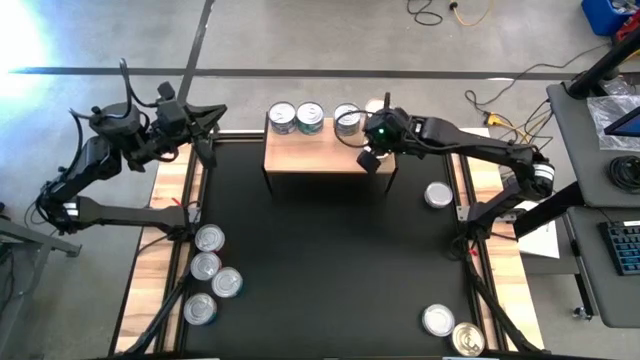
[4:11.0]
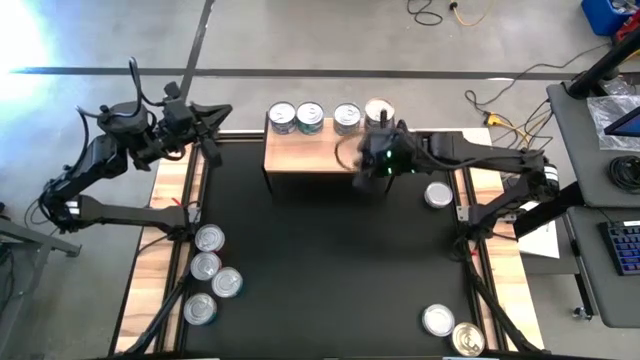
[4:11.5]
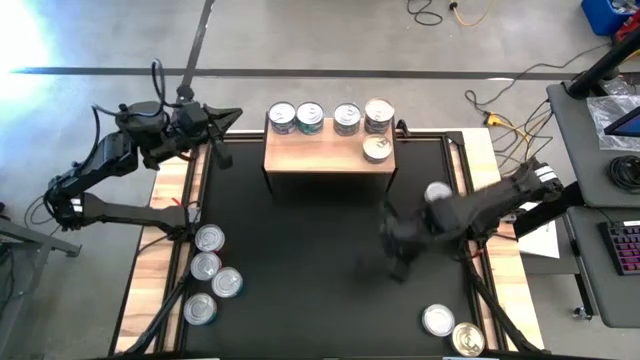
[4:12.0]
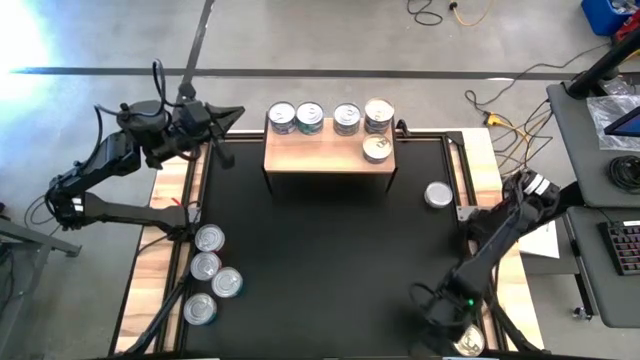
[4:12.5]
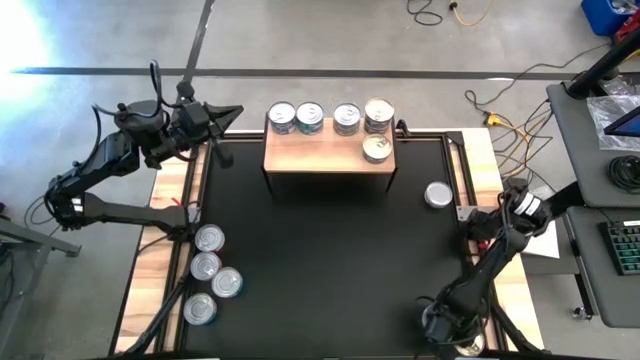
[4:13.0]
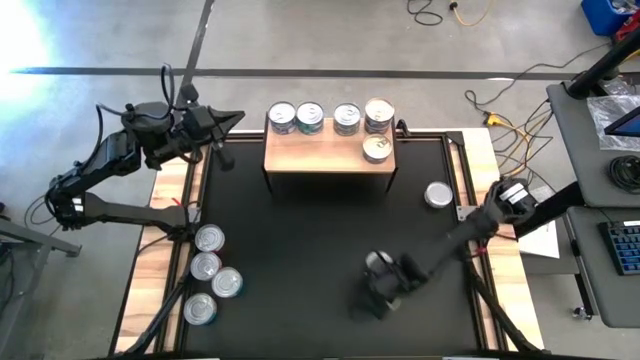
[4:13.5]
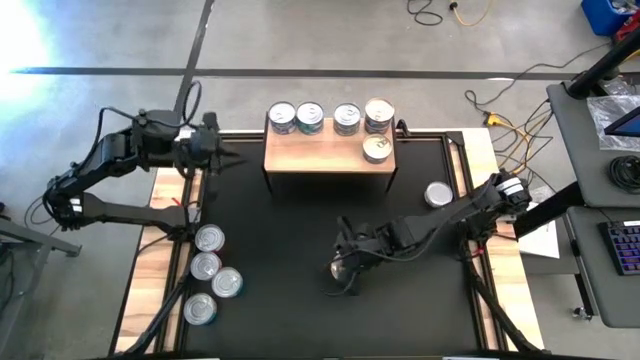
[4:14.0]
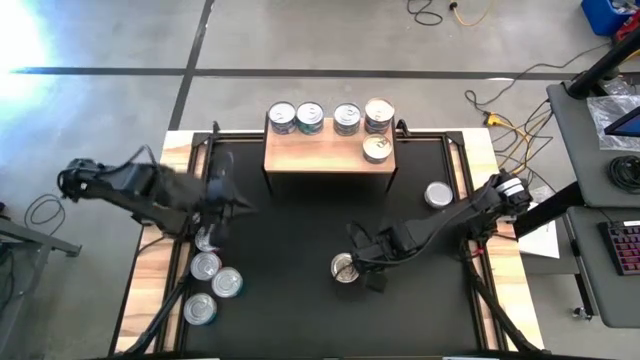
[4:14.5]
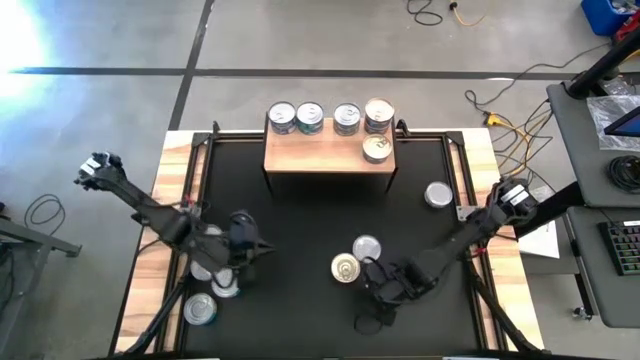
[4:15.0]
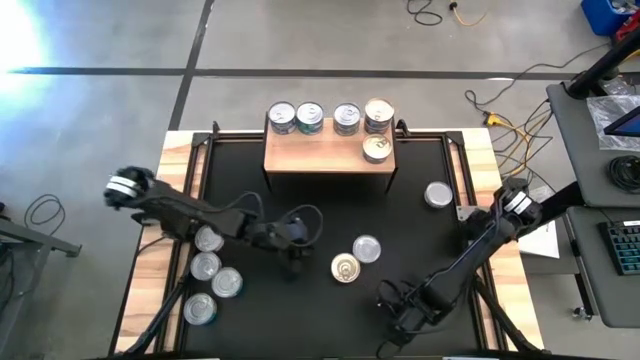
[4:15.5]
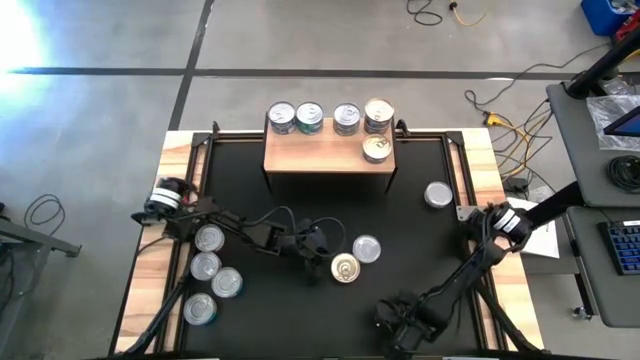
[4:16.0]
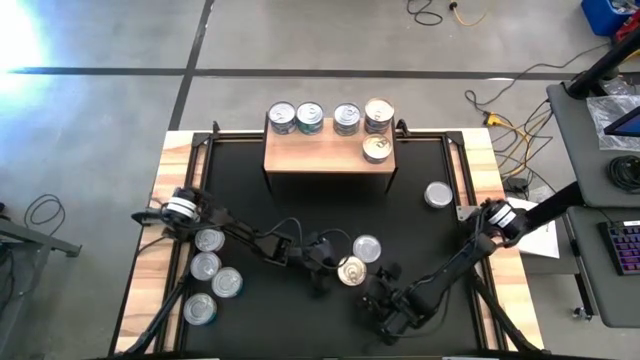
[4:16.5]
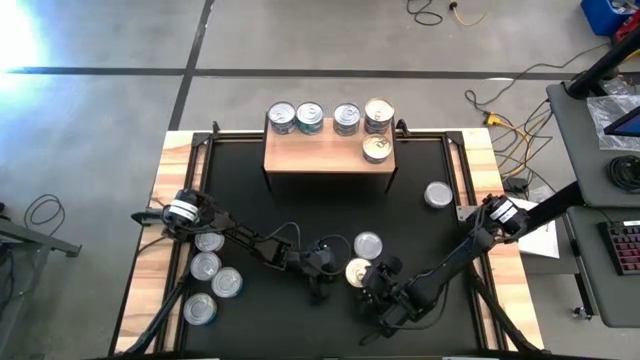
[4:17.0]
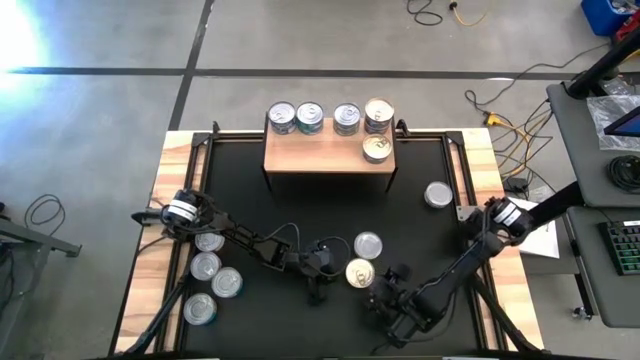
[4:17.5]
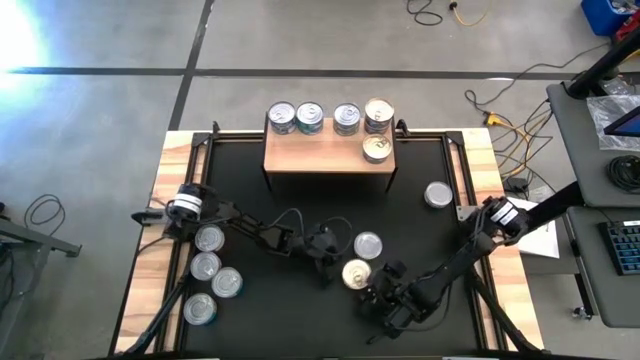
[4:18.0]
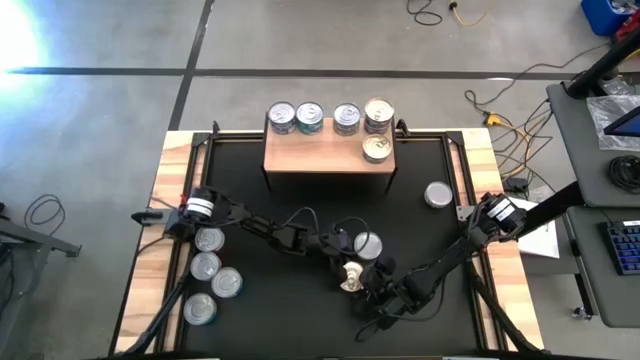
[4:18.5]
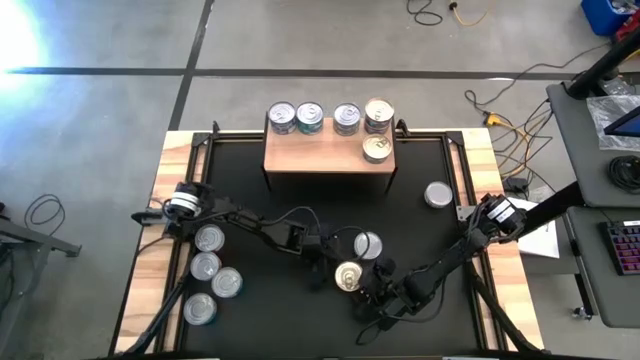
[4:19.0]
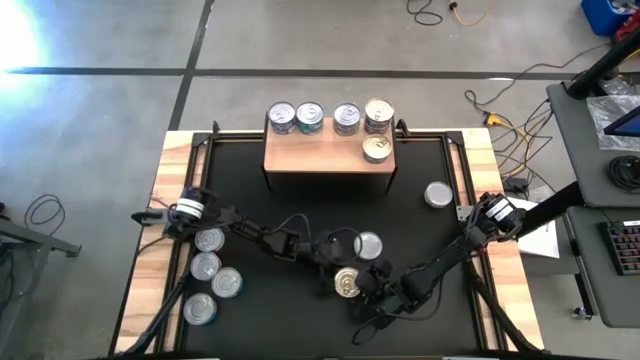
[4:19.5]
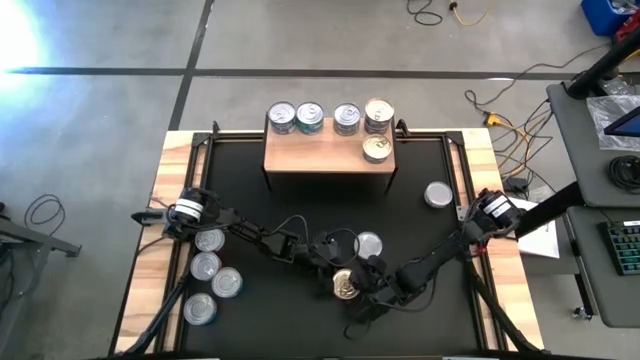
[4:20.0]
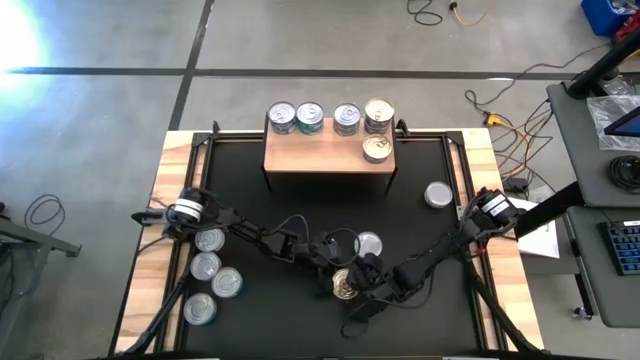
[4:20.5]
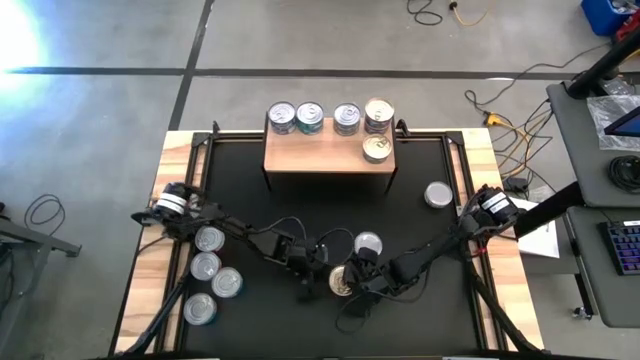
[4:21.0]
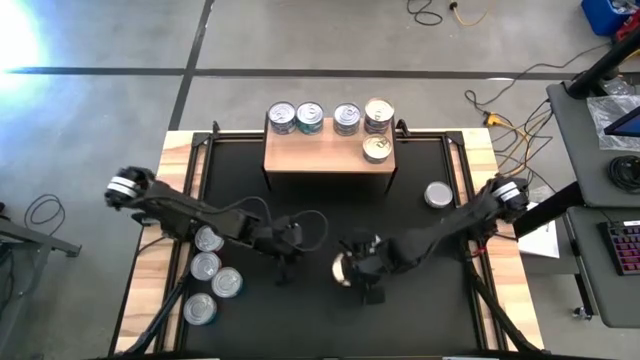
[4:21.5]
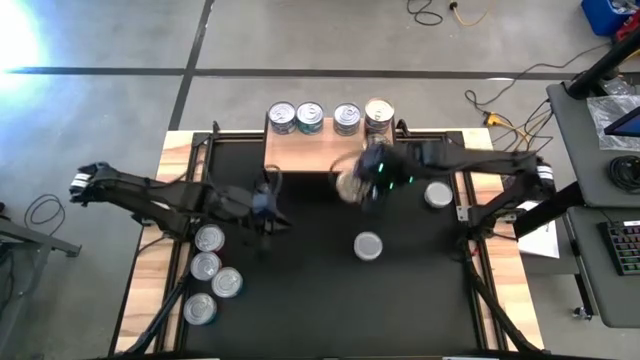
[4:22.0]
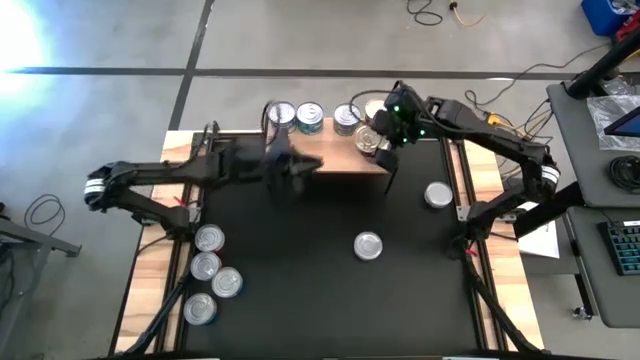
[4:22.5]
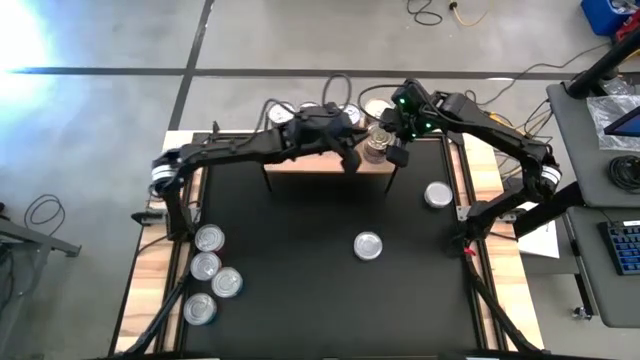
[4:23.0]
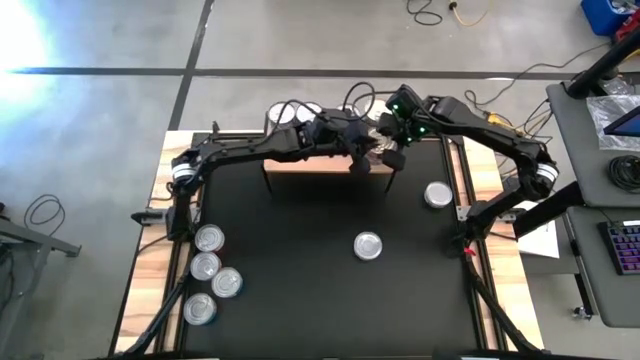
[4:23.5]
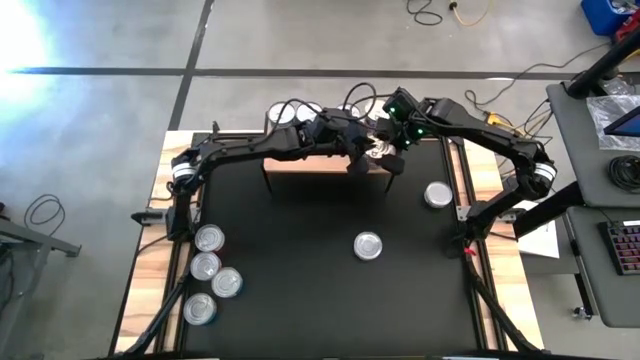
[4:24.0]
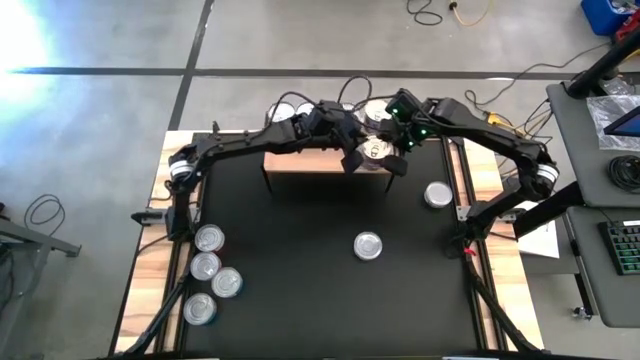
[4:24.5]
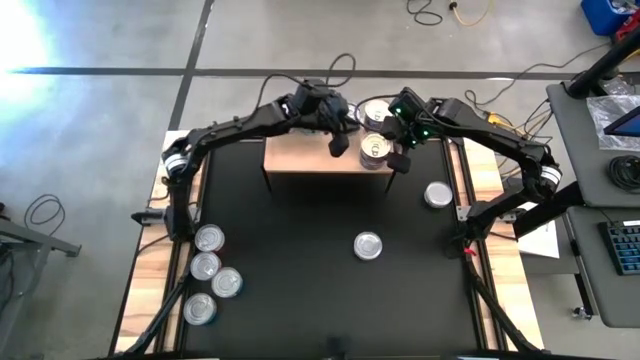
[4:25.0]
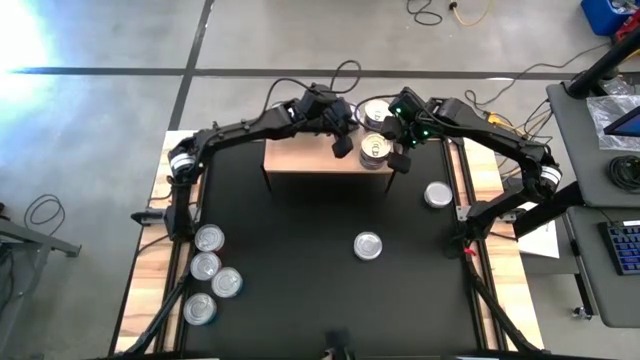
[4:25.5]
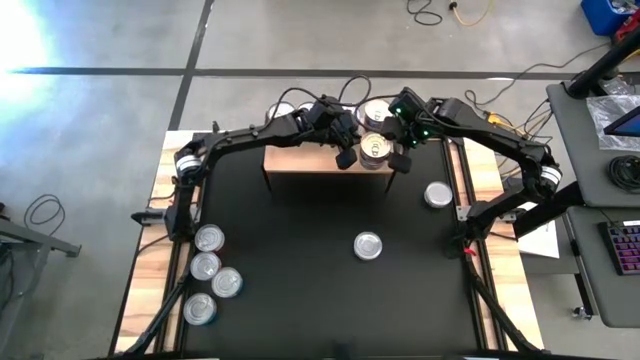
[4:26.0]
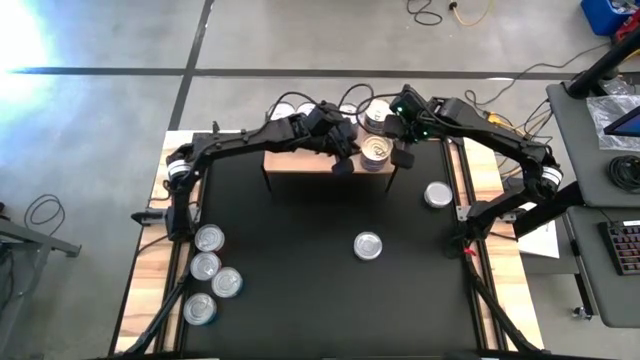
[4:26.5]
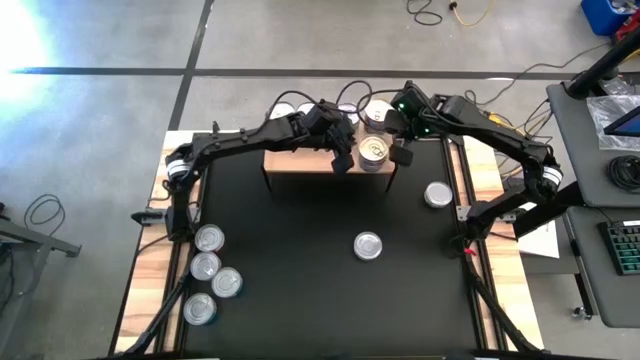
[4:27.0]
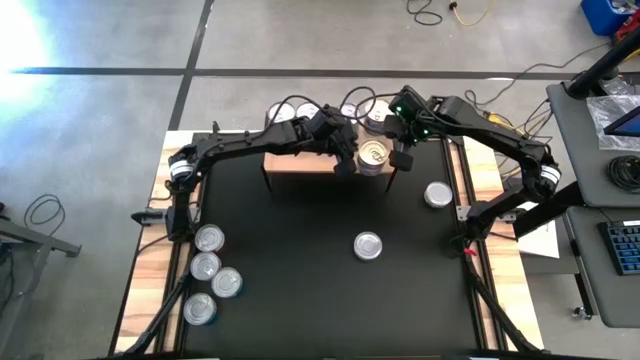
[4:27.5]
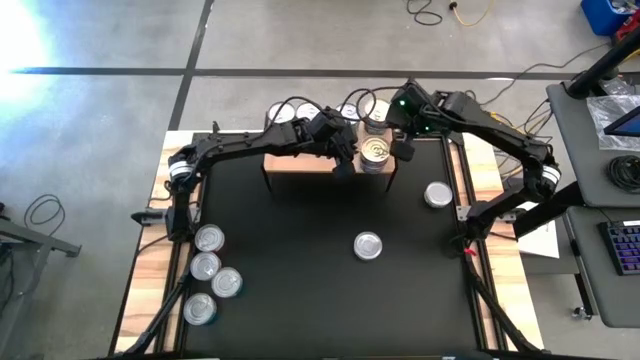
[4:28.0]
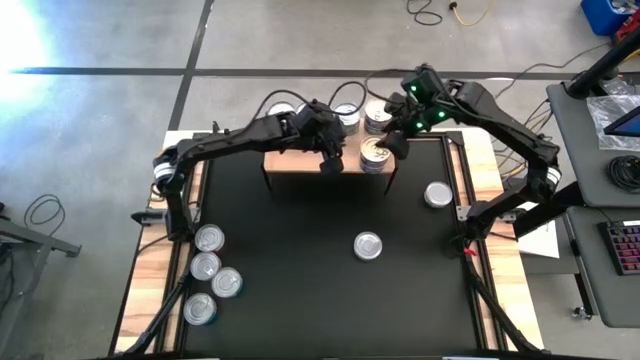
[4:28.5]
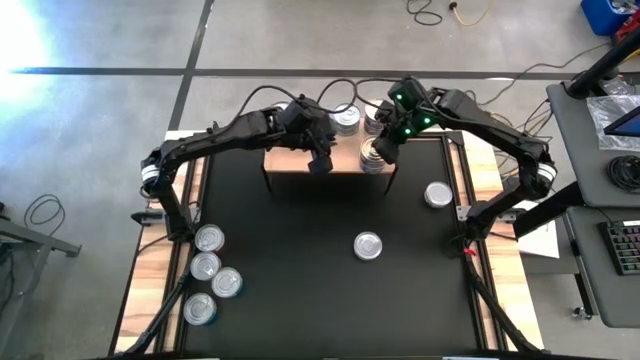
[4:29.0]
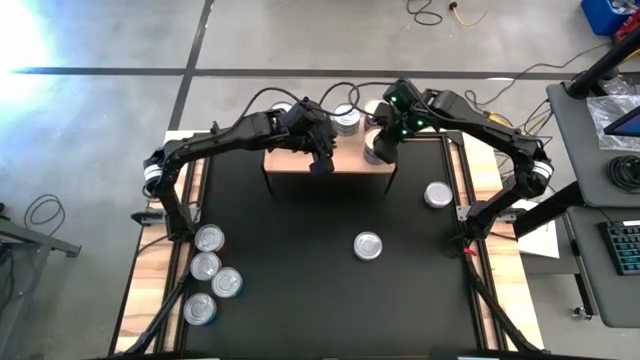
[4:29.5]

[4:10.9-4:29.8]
Task: Stack canned seafood by type on shelf
Stack the blue-pink tuna can on top of the blue tuna can

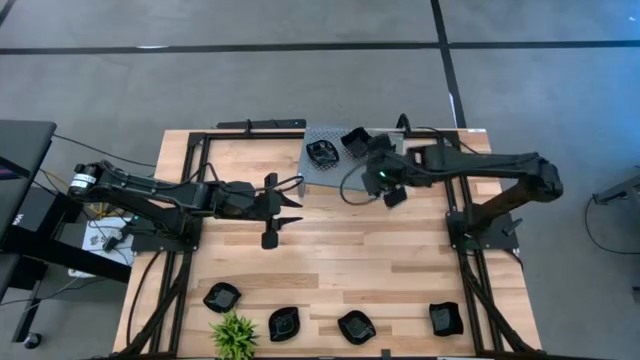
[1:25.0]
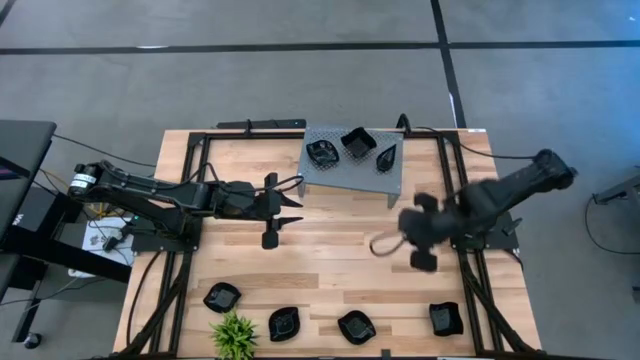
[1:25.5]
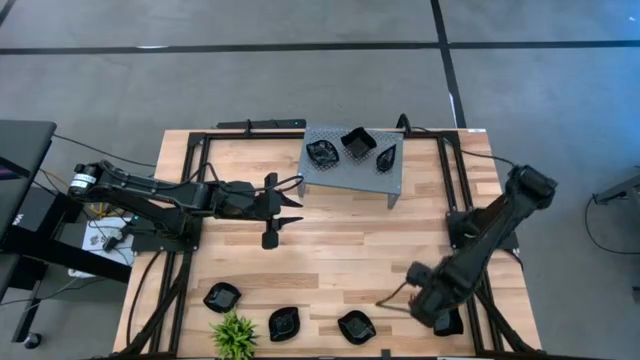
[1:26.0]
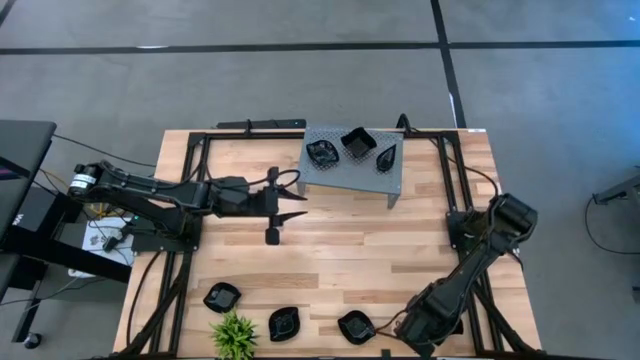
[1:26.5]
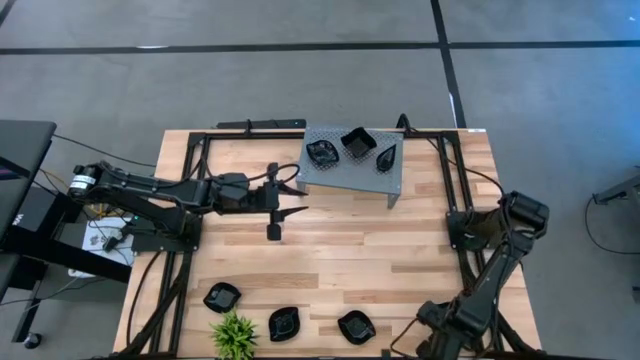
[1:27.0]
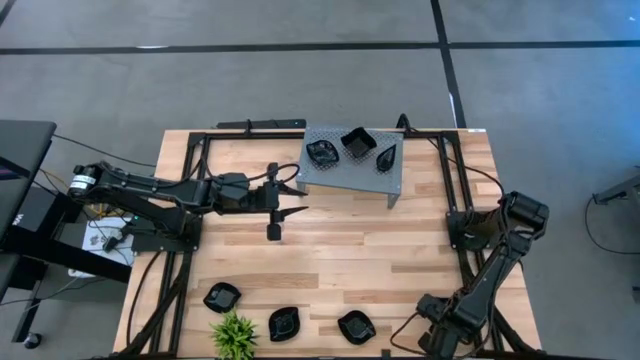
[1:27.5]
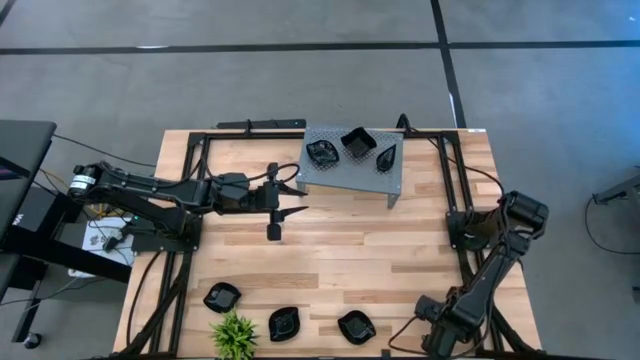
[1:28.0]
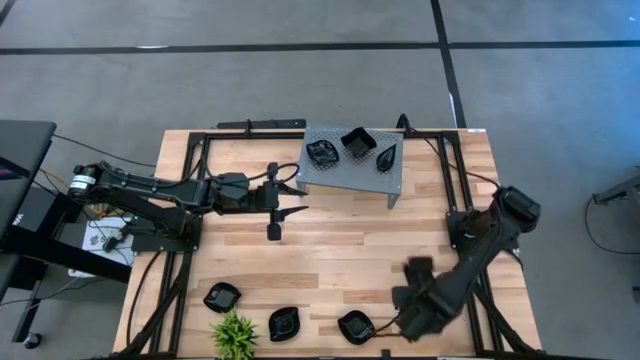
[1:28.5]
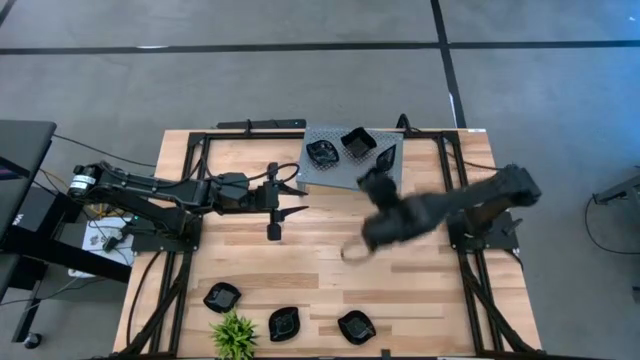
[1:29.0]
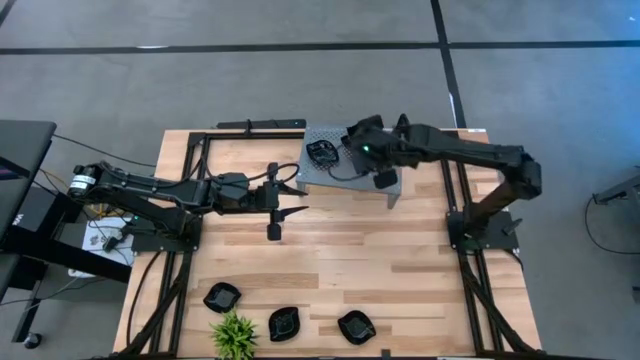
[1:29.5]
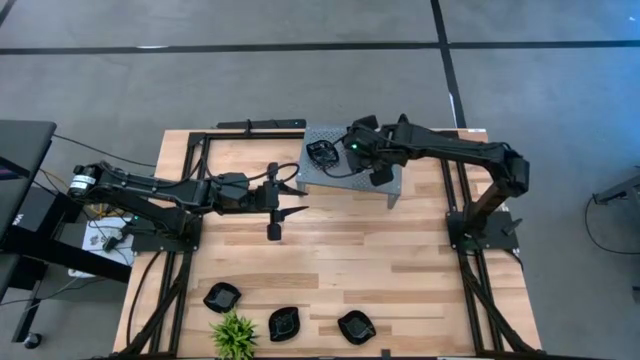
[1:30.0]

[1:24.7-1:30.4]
Task: Pick & Place Mini shaped plates
Stack the distorted square plate on the other distorted square plates on the shelf
